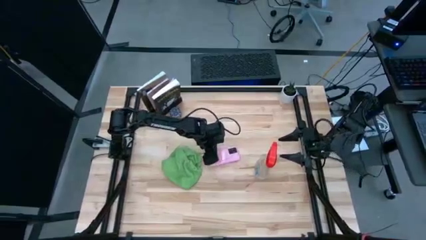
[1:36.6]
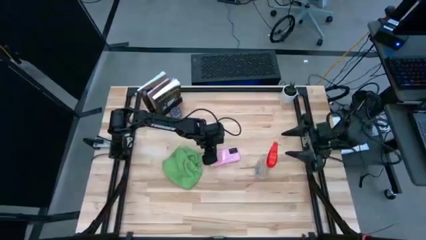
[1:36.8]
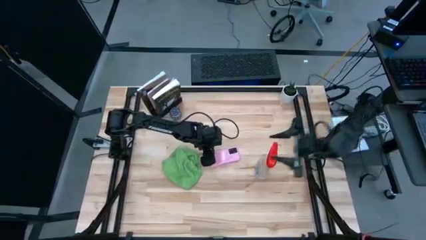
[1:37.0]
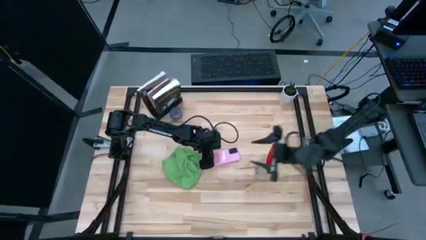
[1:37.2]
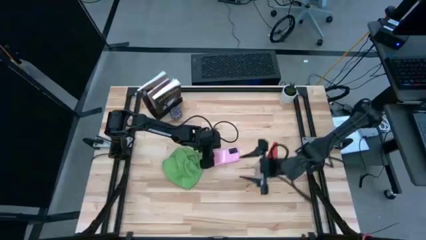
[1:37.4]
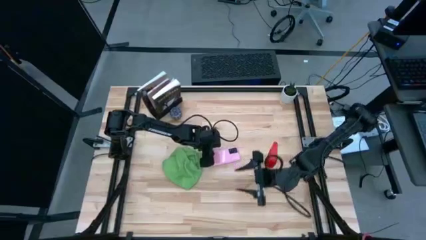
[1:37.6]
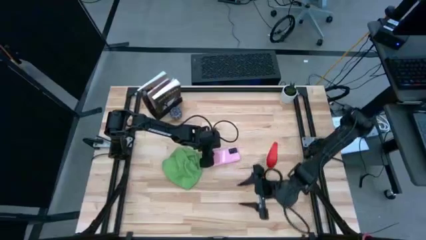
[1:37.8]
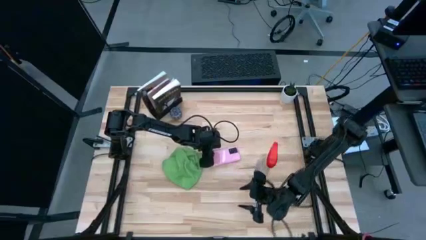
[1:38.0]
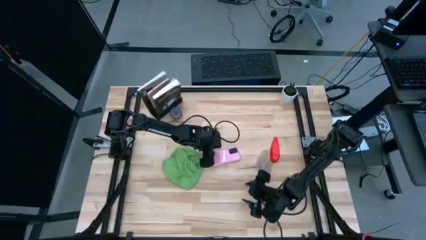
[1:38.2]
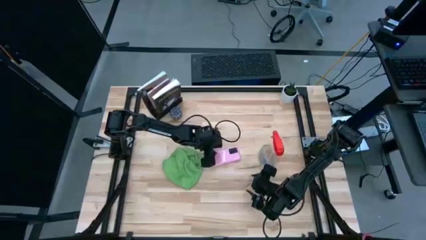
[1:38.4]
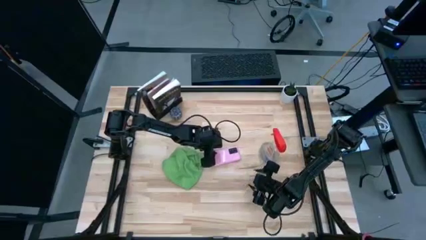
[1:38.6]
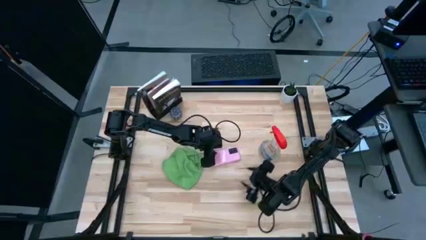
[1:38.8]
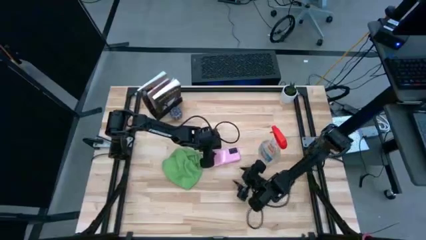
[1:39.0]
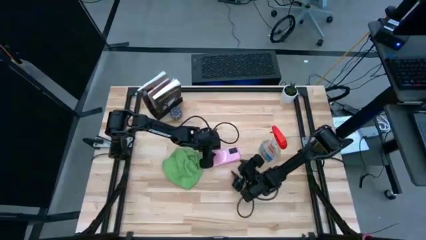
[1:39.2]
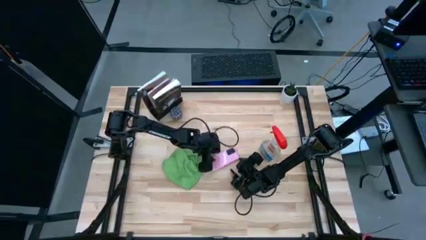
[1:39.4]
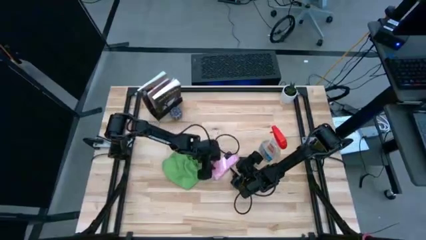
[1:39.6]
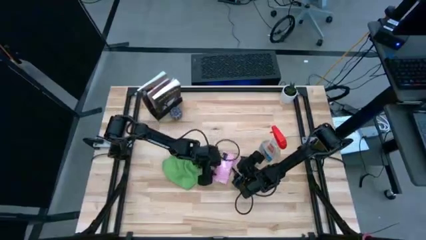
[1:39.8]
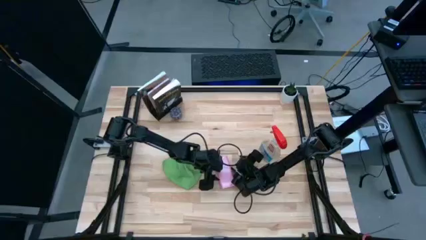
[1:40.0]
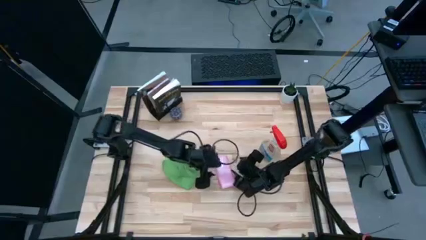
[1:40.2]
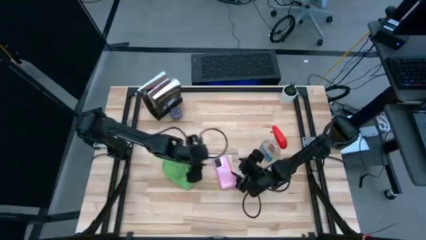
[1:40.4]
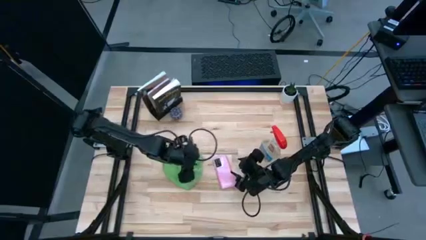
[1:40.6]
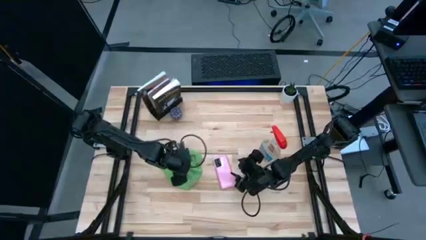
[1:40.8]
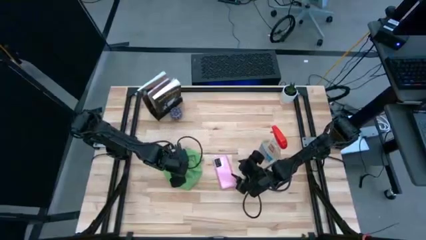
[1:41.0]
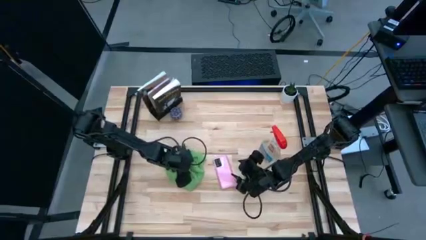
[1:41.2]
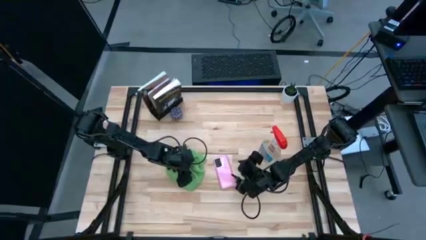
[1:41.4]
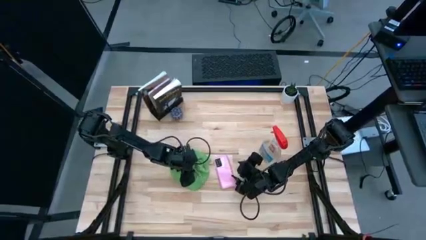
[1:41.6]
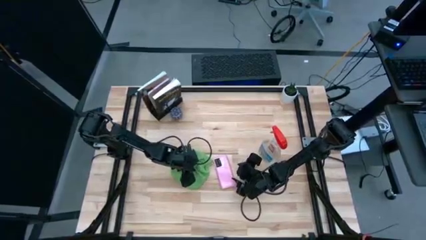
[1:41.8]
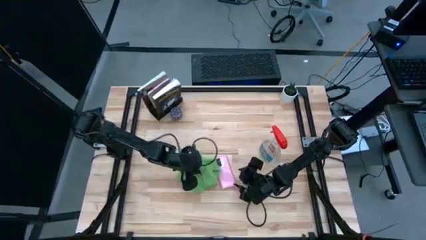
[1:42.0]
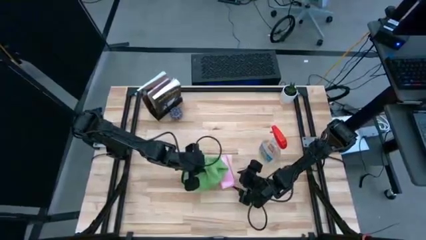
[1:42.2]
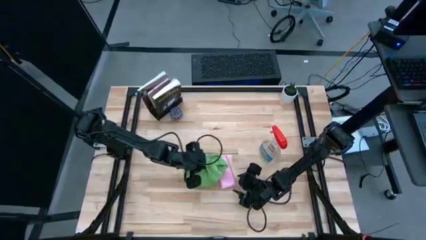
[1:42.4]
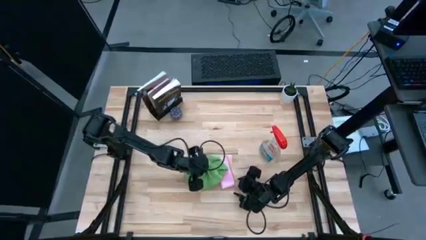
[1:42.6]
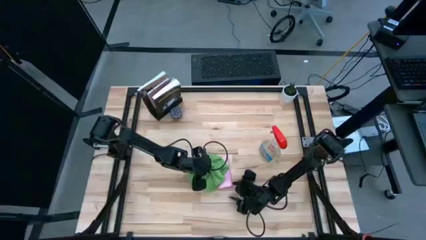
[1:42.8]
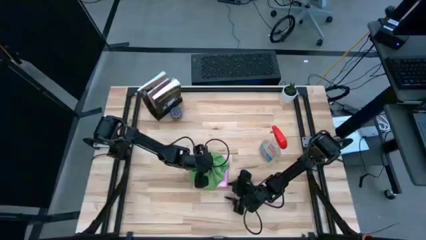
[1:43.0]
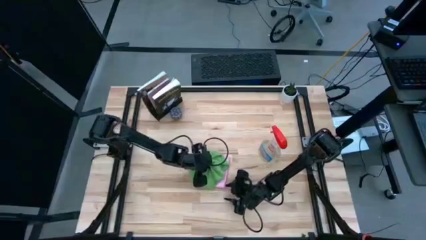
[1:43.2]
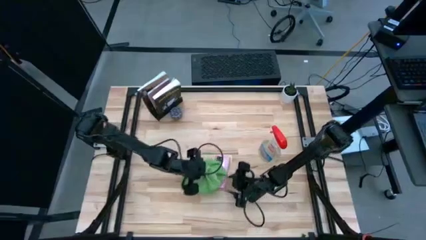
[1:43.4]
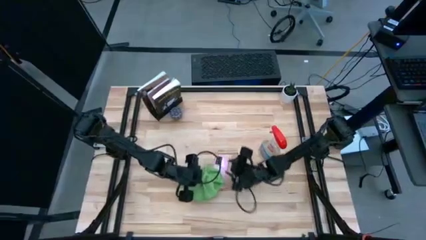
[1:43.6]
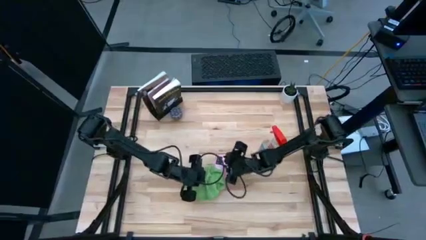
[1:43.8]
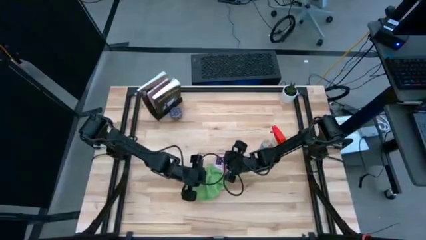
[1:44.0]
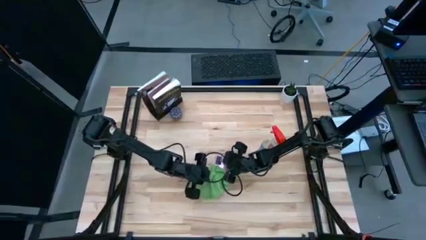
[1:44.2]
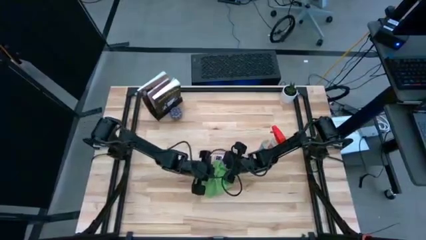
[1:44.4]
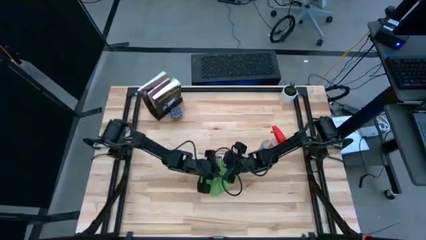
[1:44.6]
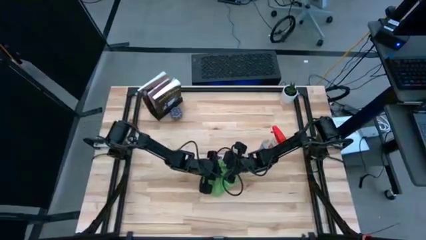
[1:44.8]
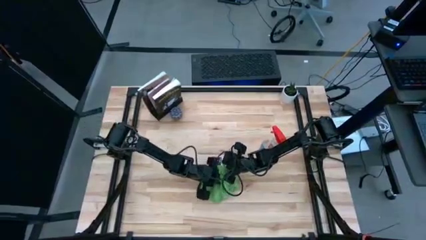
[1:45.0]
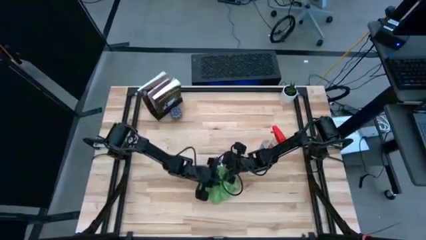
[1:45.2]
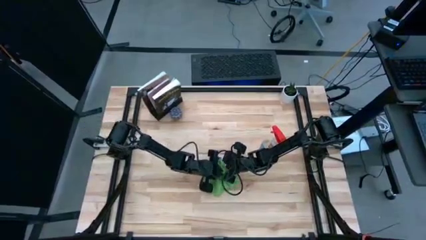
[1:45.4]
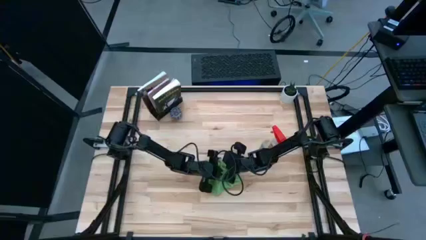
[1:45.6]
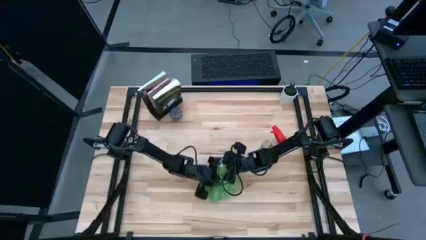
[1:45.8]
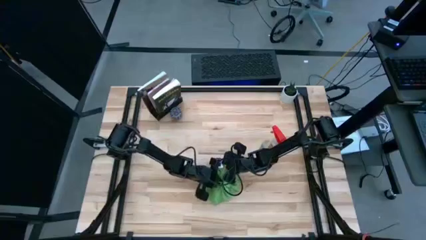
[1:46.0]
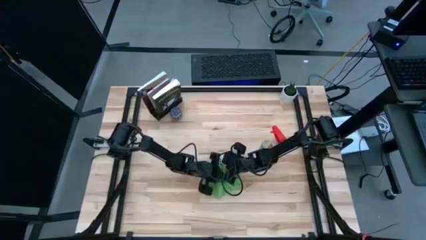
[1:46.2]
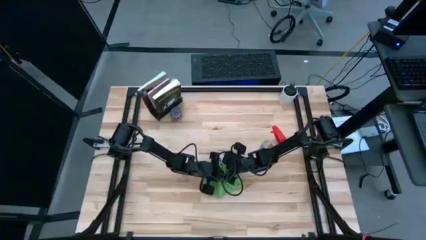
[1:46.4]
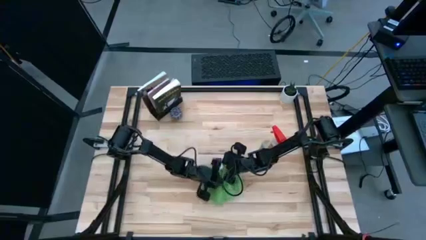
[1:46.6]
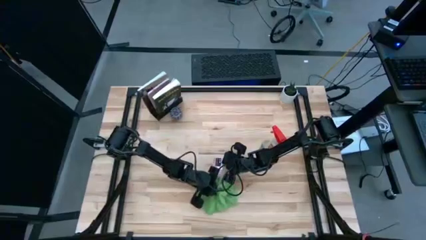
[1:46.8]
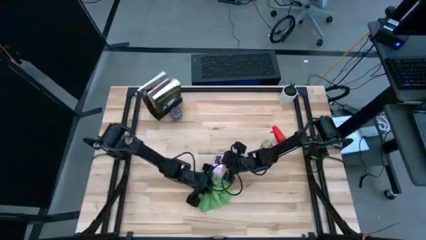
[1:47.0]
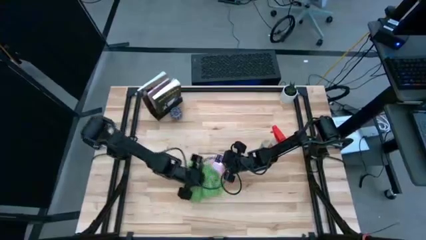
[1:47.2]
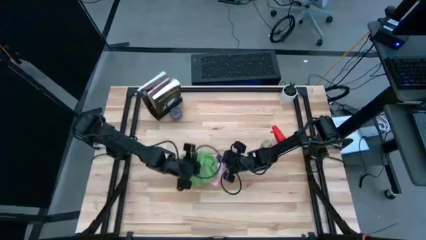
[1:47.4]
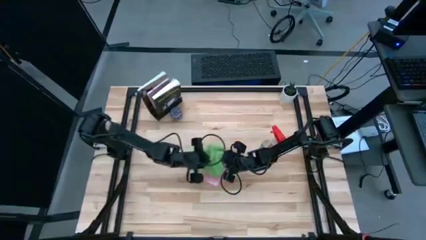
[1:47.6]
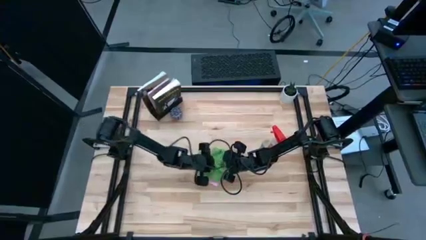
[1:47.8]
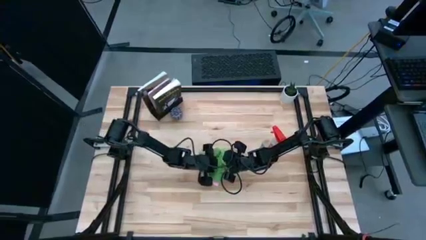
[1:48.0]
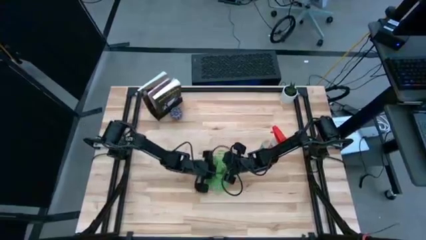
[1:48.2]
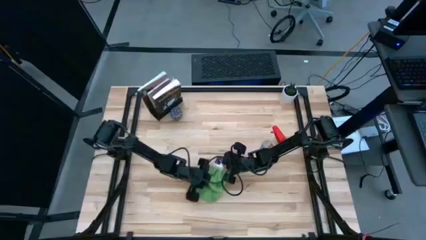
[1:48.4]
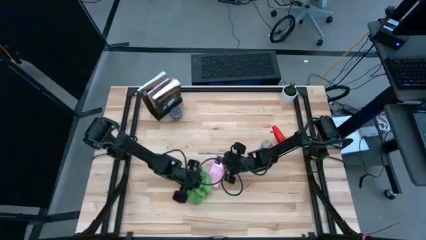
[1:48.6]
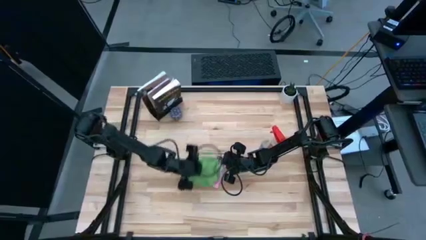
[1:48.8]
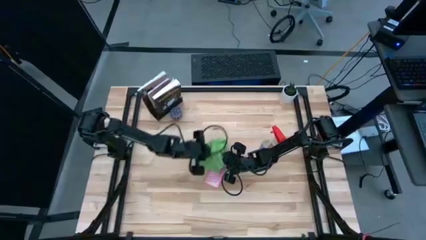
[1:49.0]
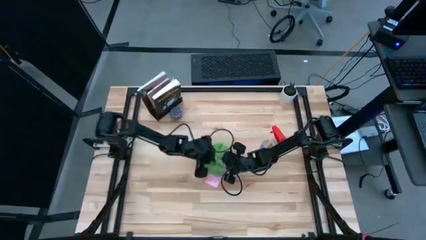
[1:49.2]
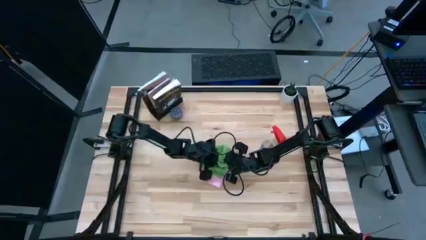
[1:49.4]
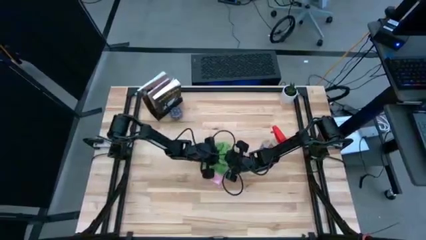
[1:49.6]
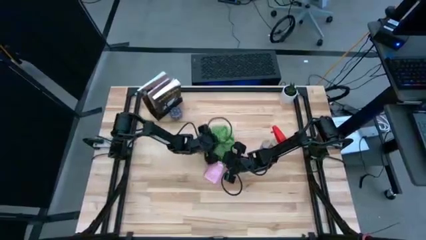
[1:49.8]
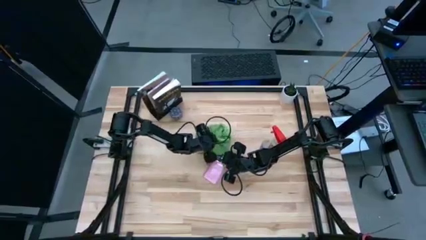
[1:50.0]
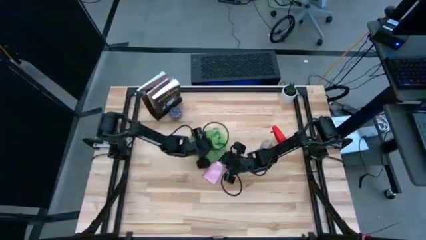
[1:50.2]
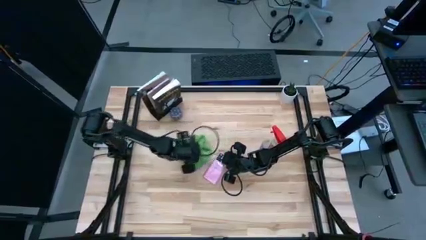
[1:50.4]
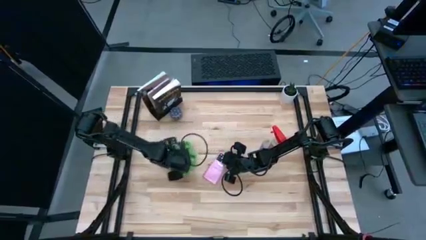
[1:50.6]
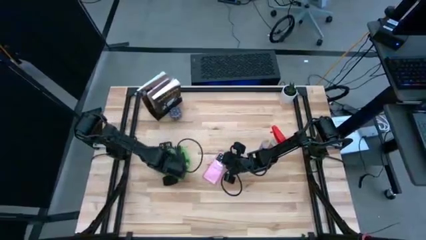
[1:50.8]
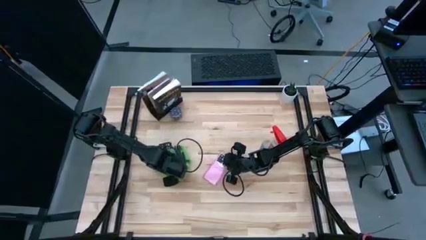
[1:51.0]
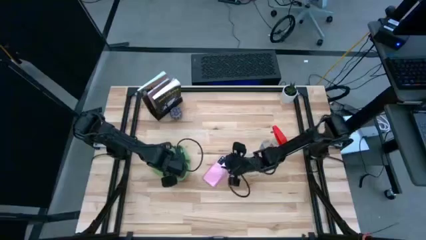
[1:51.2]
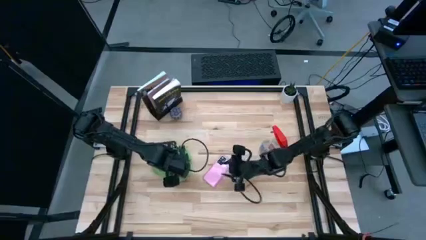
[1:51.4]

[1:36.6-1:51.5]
Task: Apply microfiber cloth
Wipe the front of the pink cellphone with the green microfiber cloth
